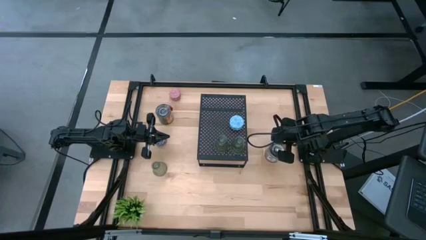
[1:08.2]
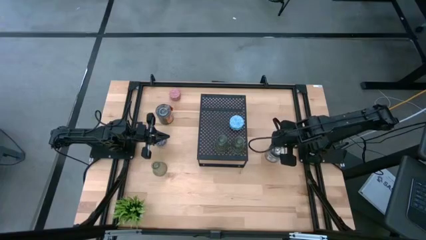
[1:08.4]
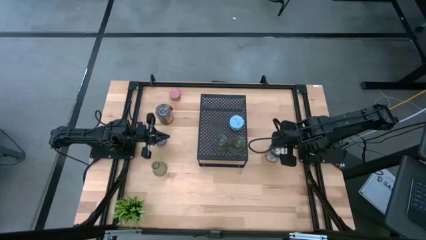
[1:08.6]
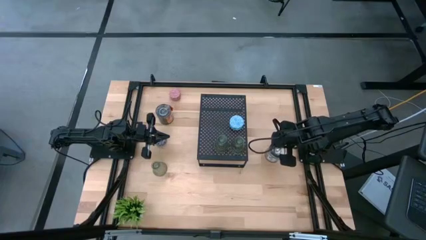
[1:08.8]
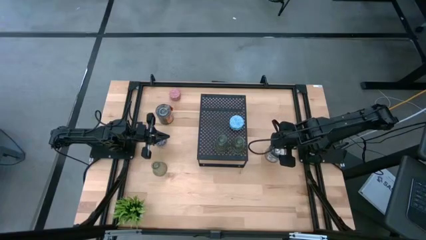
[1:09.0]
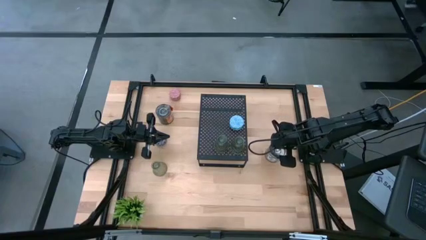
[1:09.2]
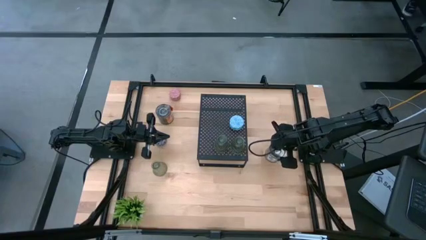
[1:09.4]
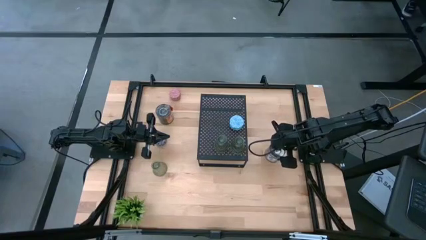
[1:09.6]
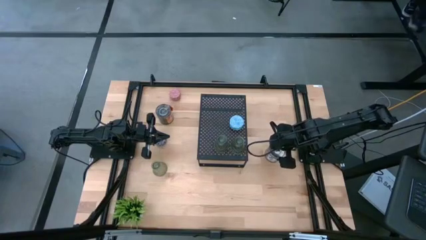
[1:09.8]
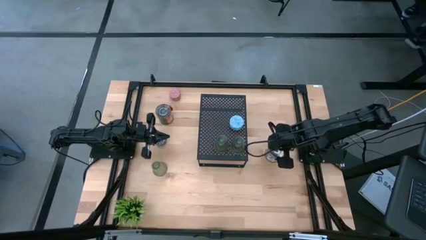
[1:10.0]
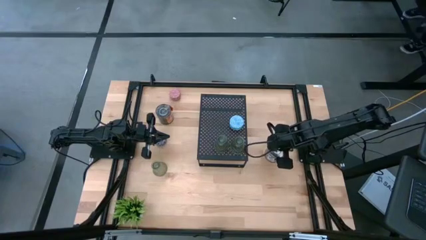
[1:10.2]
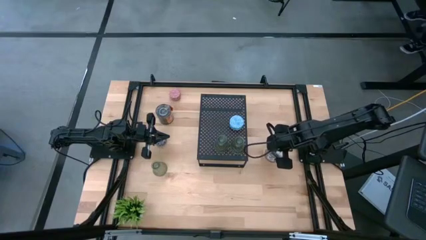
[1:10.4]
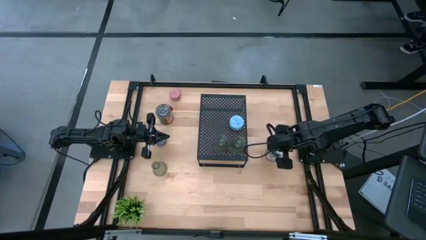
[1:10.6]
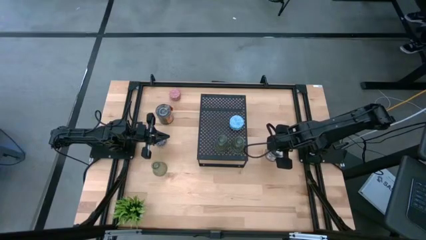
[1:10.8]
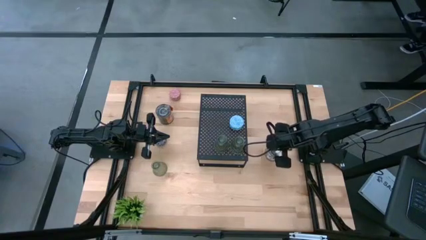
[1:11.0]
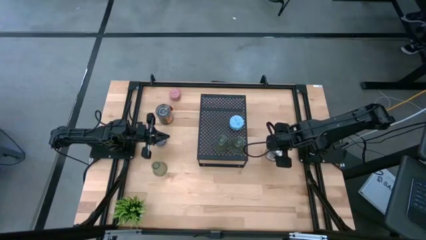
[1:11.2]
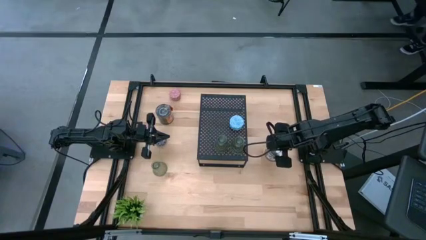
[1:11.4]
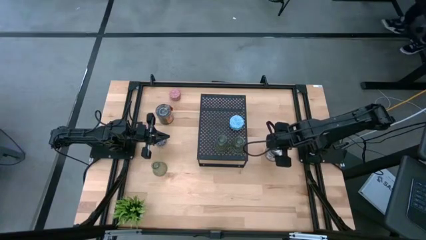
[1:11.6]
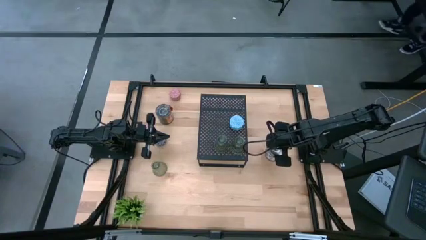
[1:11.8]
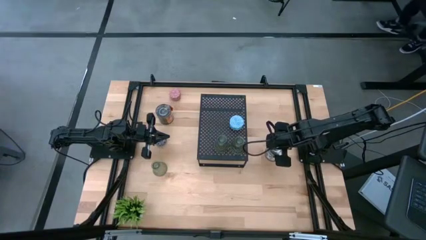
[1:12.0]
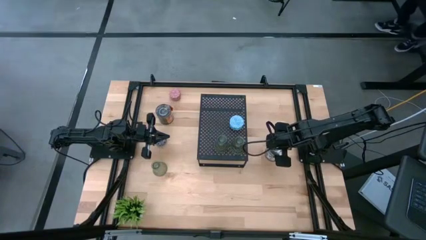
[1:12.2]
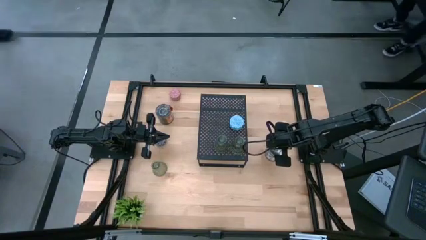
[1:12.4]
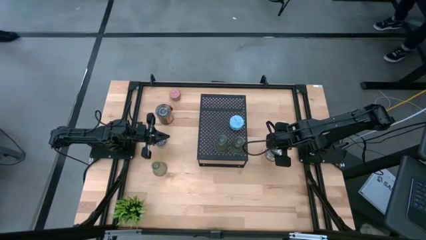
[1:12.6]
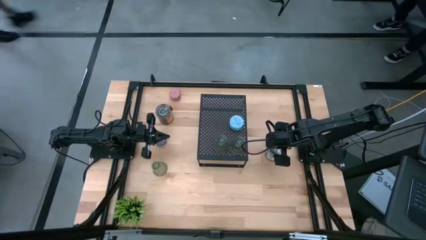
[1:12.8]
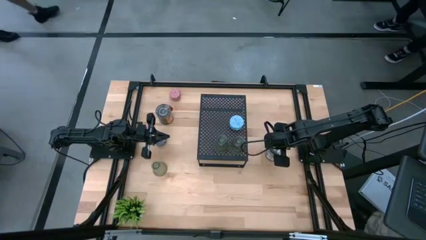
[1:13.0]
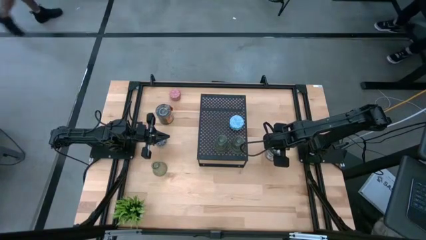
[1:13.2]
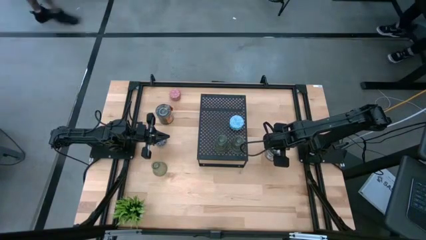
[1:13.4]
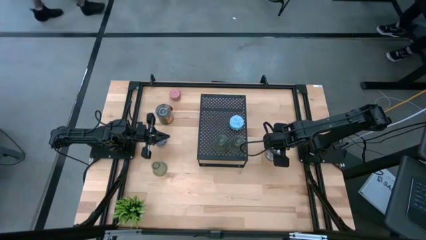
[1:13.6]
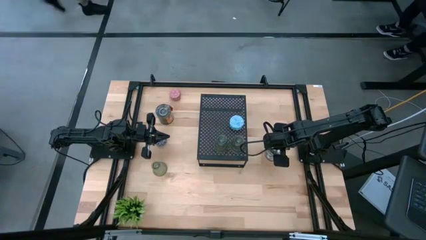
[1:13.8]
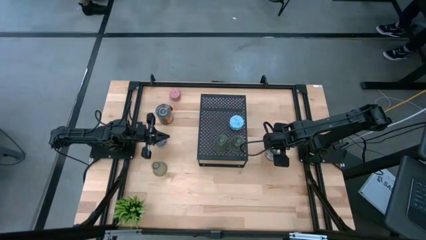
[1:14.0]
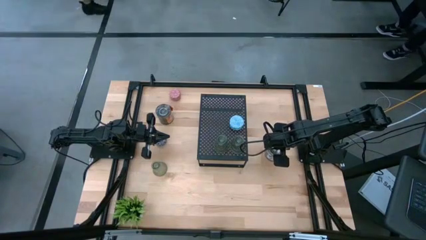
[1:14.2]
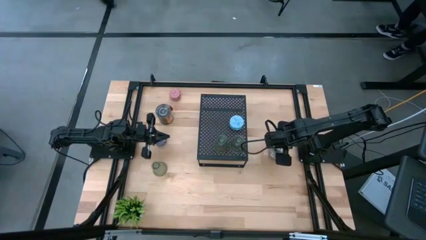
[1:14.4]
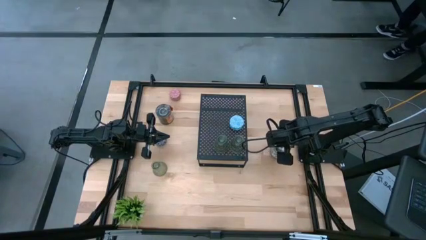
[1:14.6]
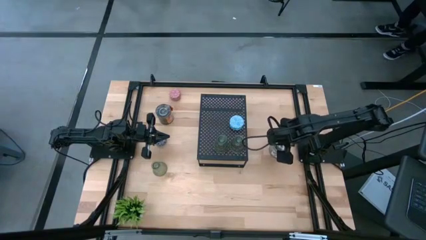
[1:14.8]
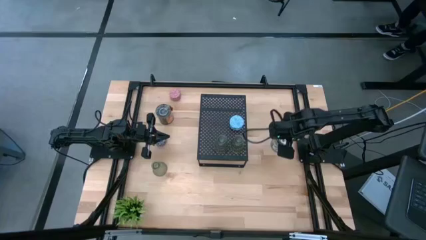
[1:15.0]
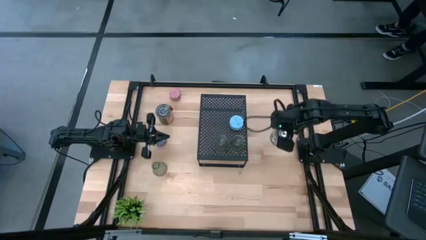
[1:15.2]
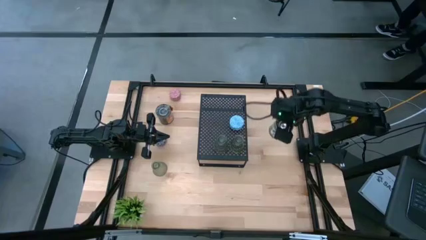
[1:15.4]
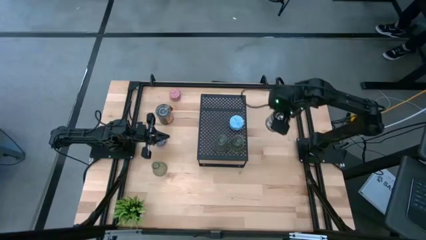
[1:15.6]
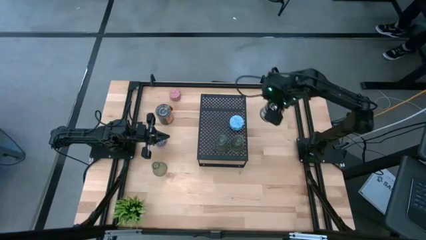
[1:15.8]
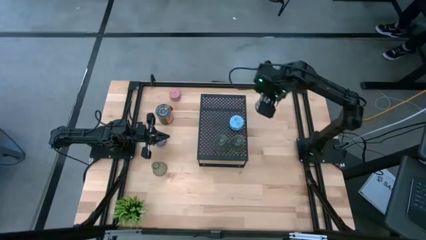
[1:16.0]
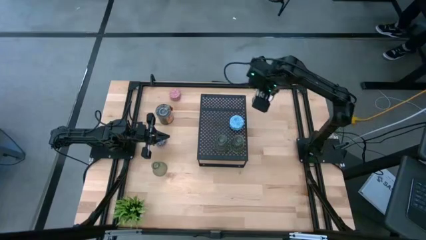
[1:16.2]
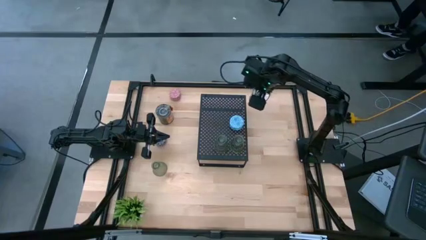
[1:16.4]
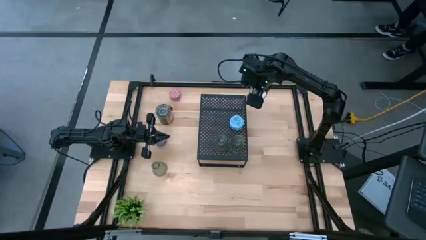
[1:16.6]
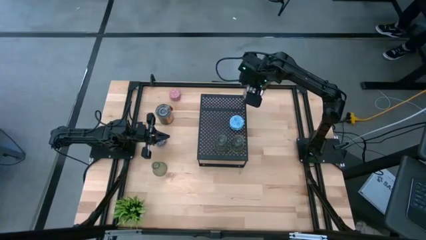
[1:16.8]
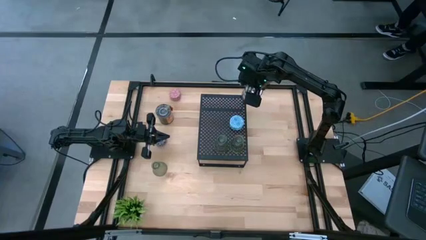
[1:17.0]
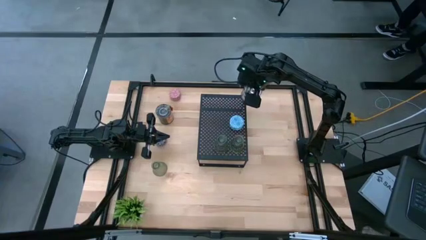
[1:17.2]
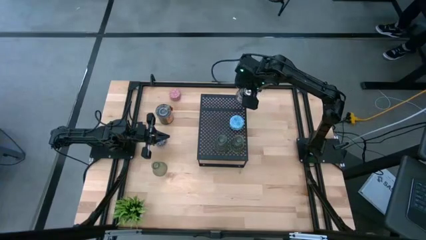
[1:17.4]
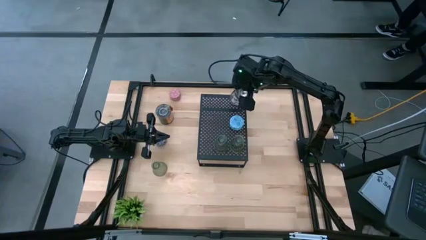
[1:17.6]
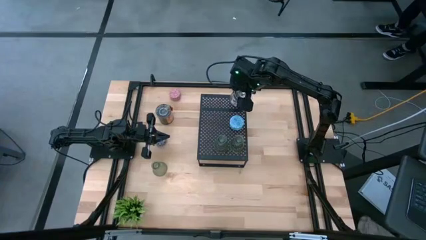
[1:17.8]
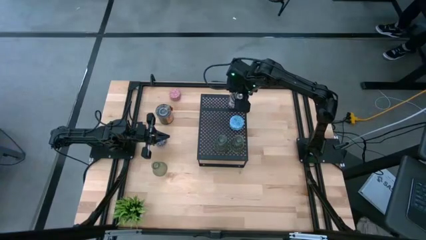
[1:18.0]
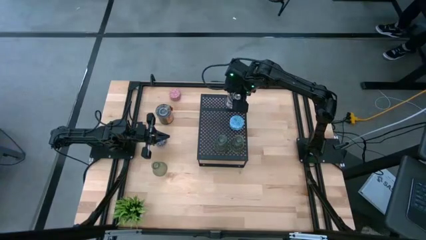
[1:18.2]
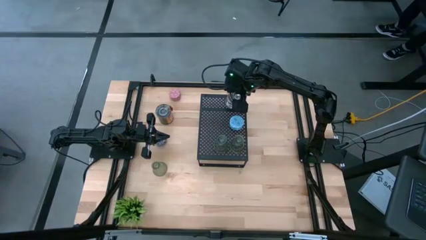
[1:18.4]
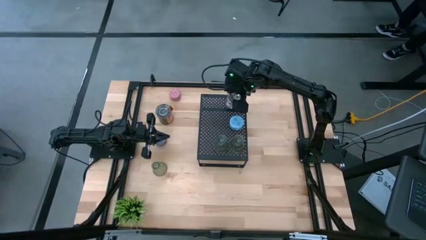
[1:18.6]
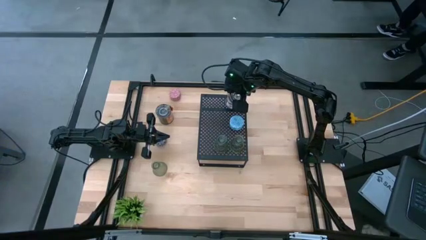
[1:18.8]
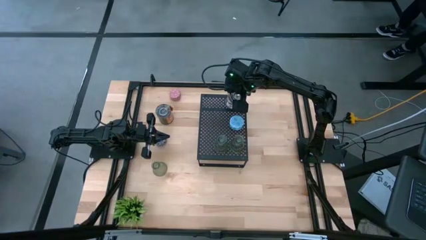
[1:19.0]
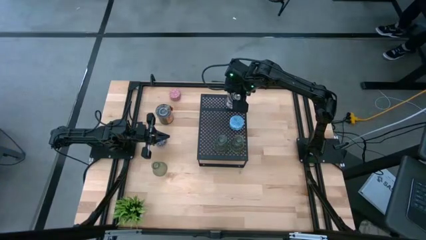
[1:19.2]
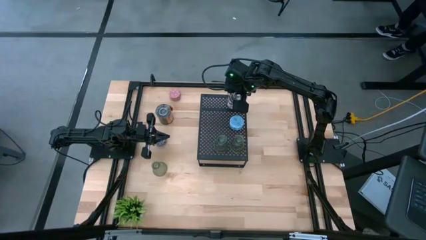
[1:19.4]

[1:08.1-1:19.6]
Task: Pick & Place candle stick holders
Put the brown scented candle on the shelf
